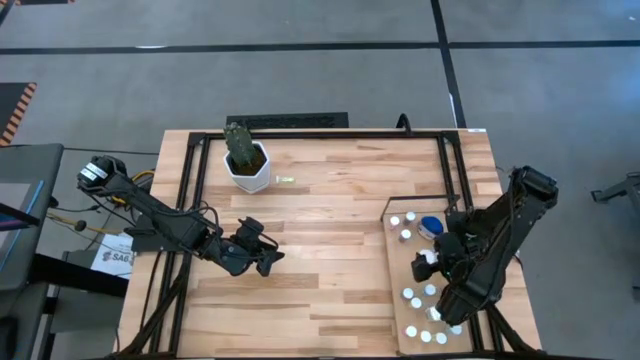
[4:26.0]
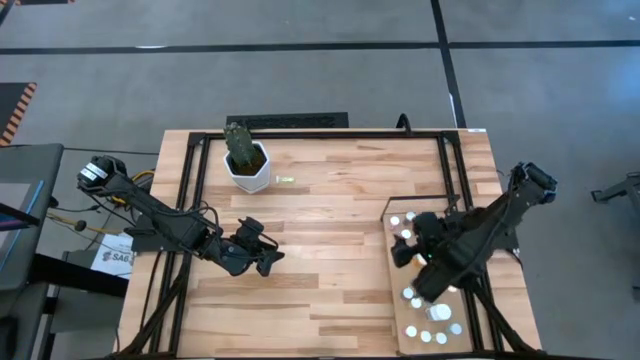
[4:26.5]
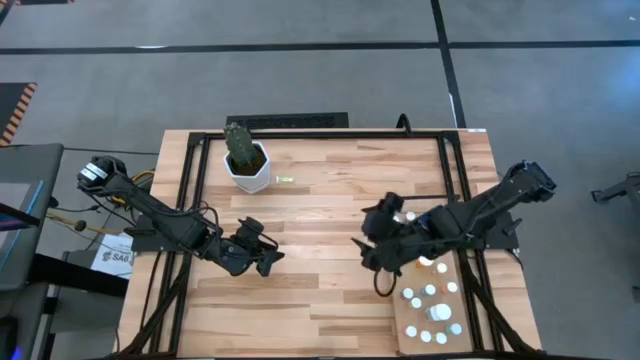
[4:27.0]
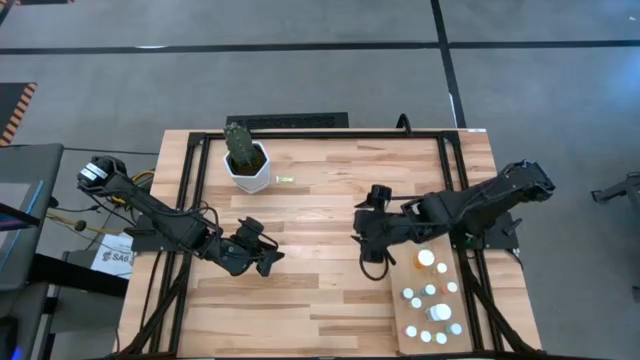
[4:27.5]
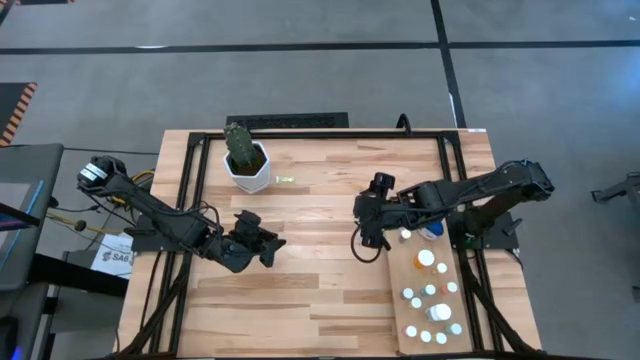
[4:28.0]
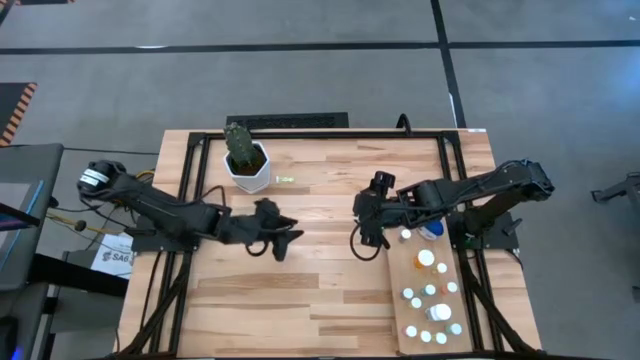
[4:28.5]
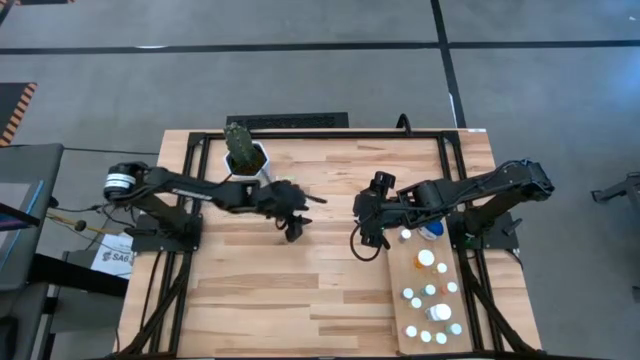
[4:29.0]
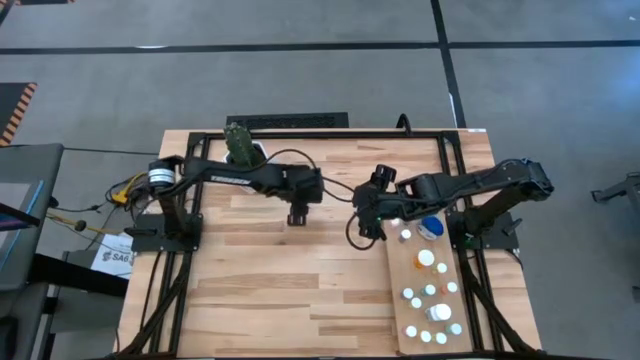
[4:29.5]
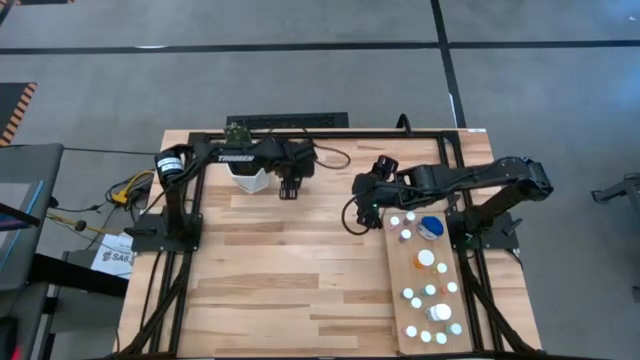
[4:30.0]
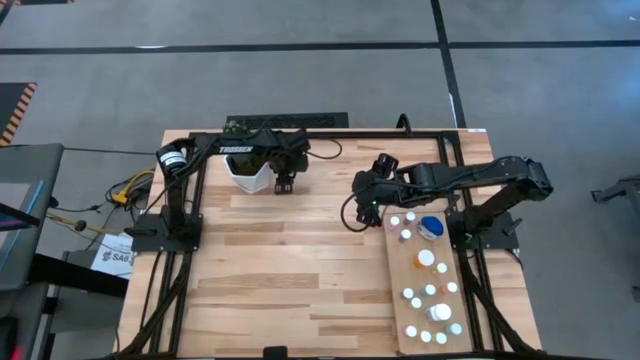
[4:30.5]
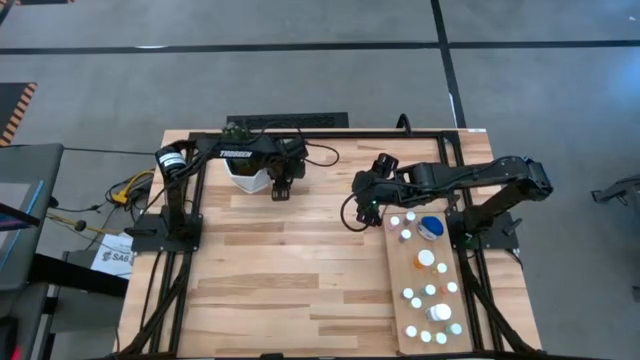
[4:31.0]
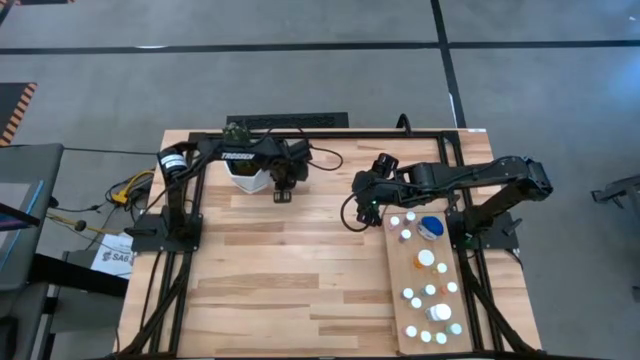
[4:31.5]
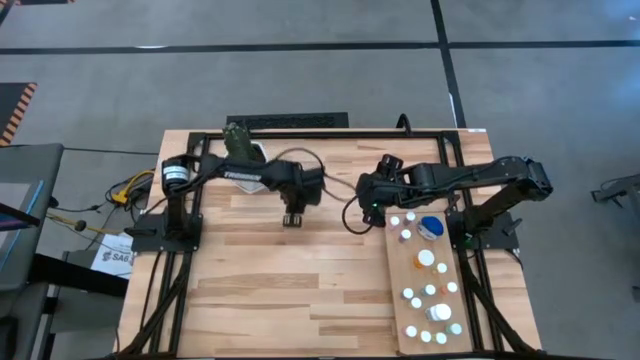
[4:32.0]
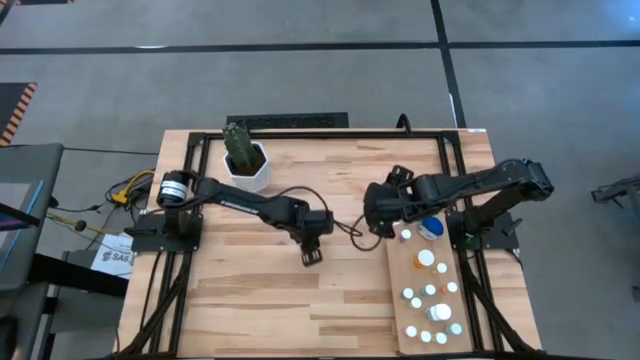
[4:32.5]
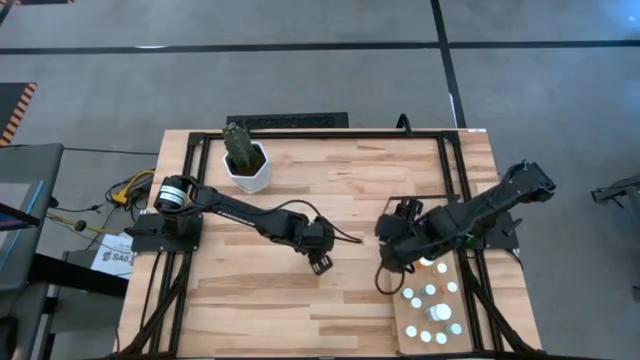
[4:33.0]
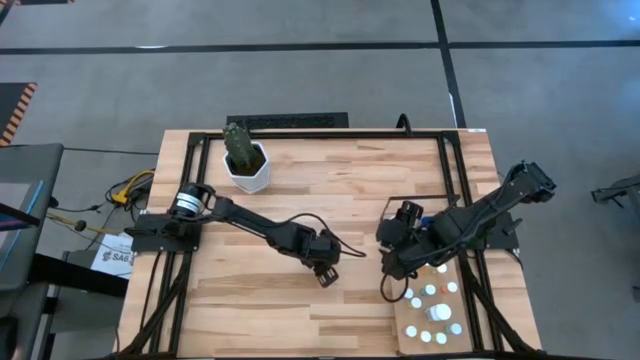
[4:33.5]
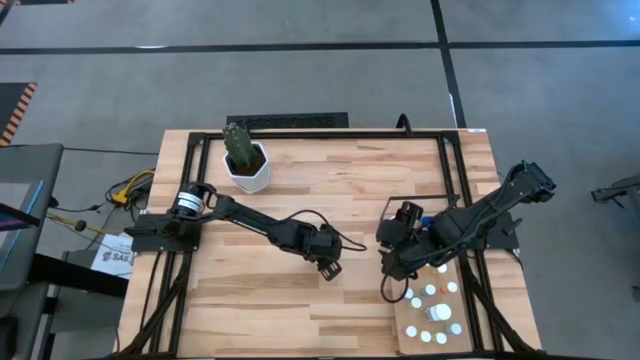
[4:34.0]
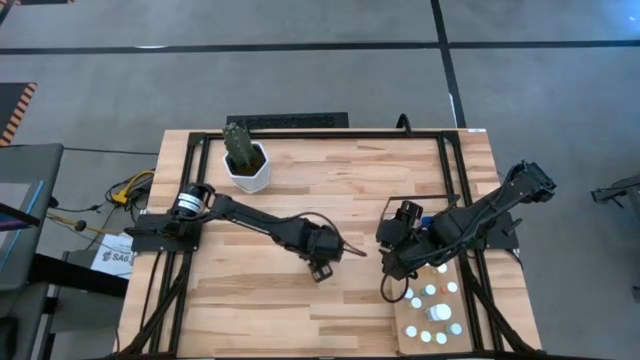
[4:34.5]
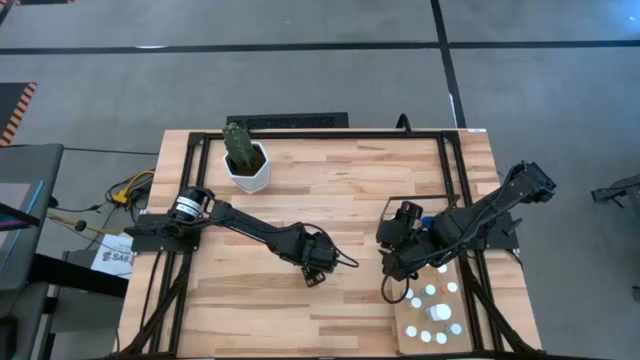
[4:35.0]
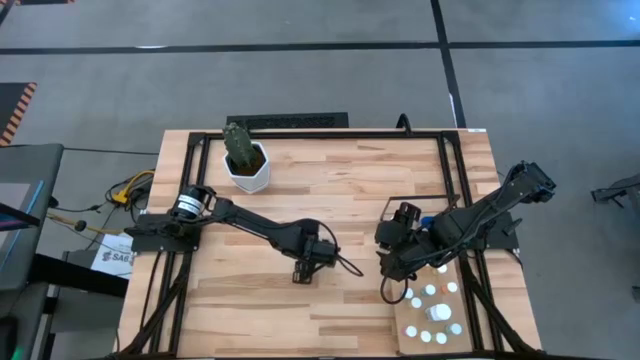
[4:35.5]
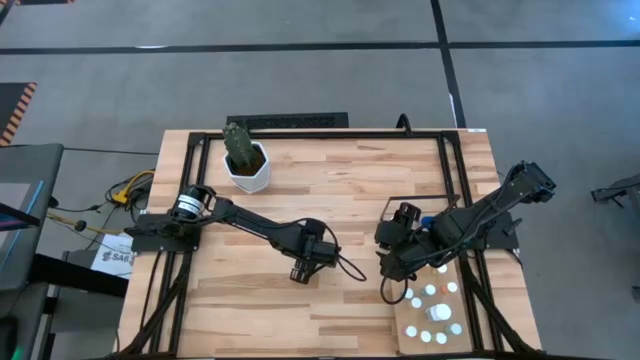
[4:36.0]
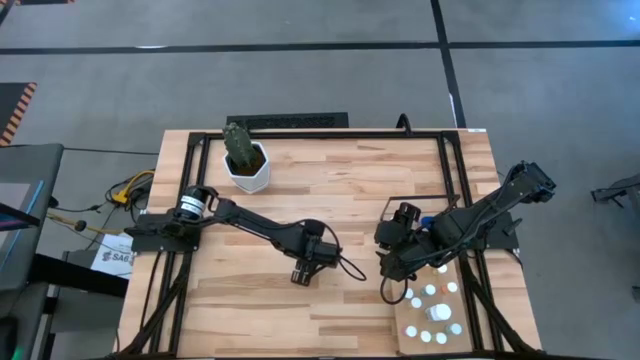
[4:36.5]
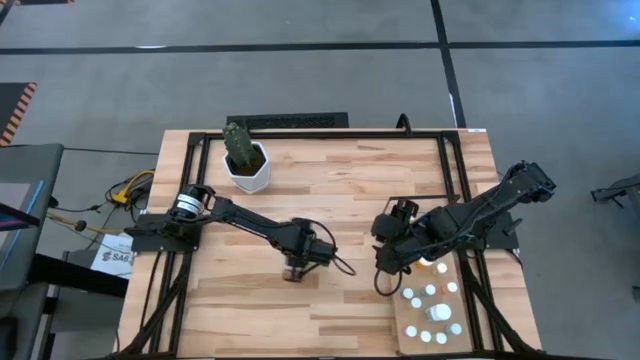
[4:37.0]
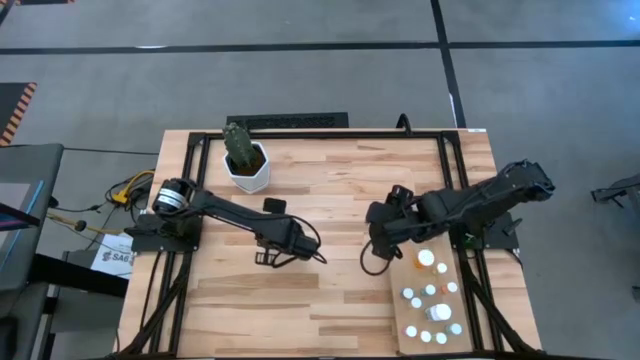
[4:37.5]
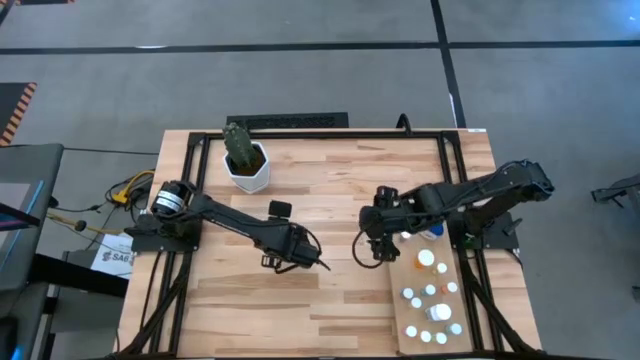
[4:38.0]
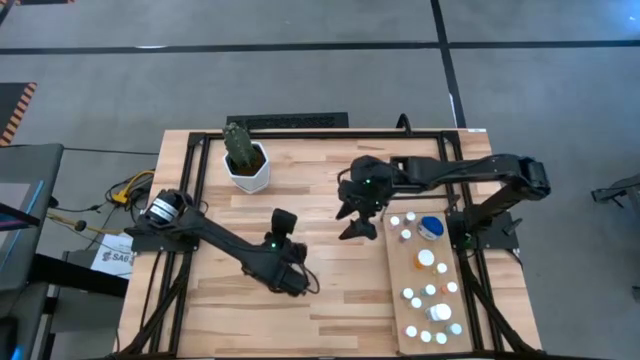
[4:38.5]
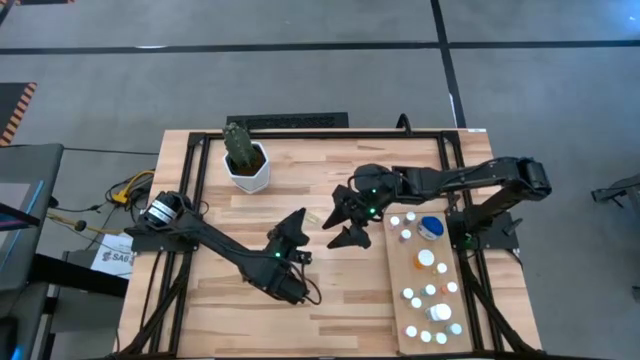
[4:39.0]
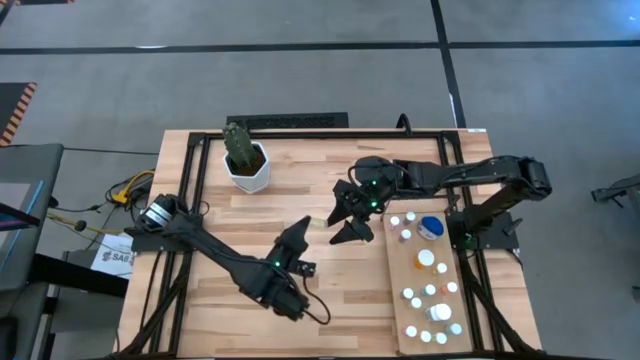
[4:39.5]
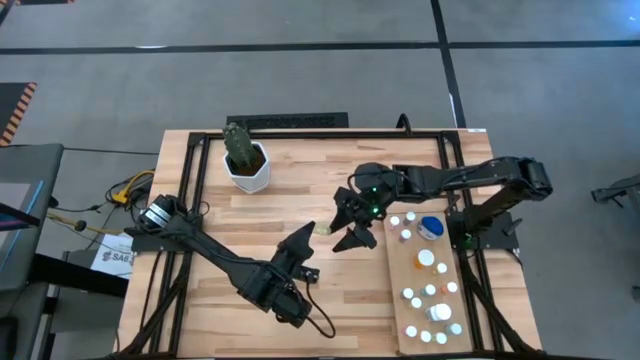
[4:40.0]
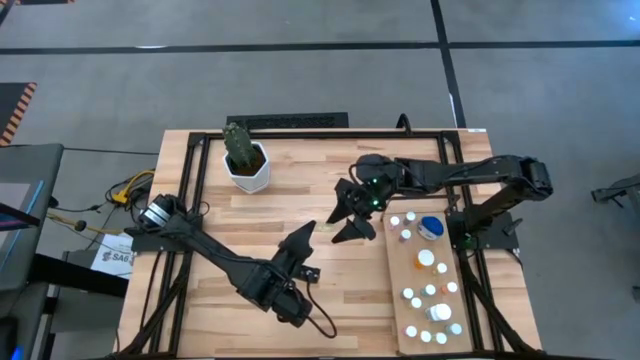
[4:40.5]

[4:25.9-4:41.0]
Task: Pick and place medicine bottles onto shelf by color
Put the yellow pill bottle on the shelf

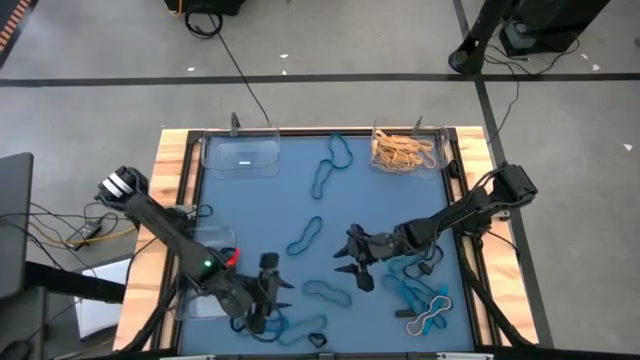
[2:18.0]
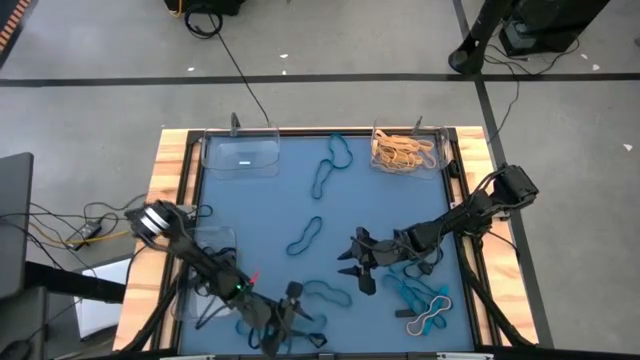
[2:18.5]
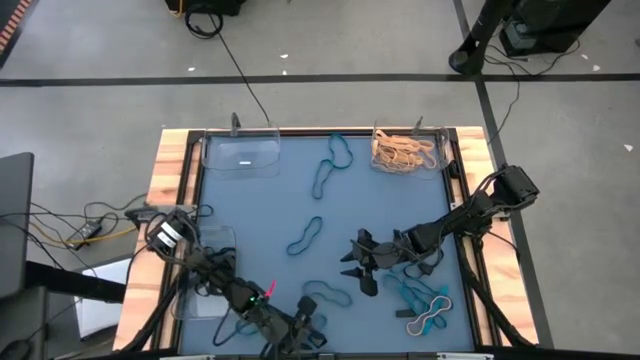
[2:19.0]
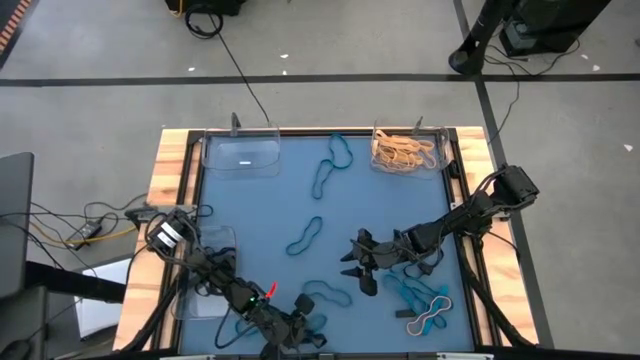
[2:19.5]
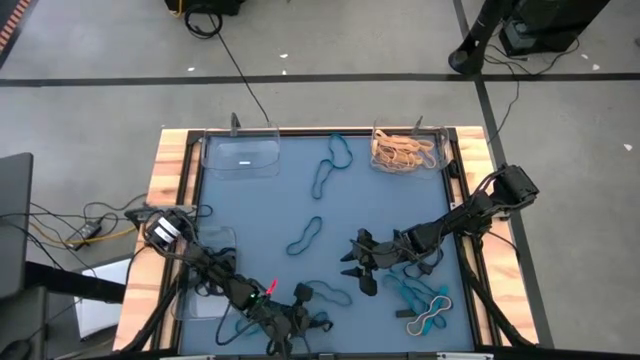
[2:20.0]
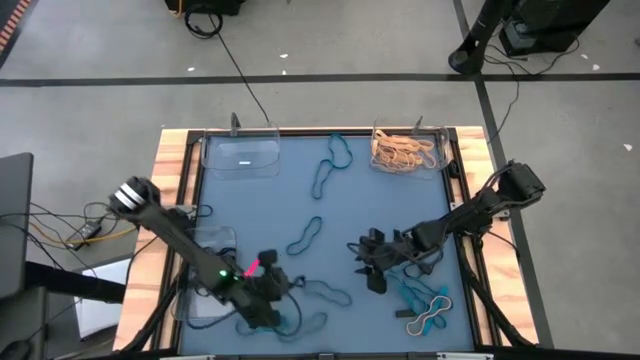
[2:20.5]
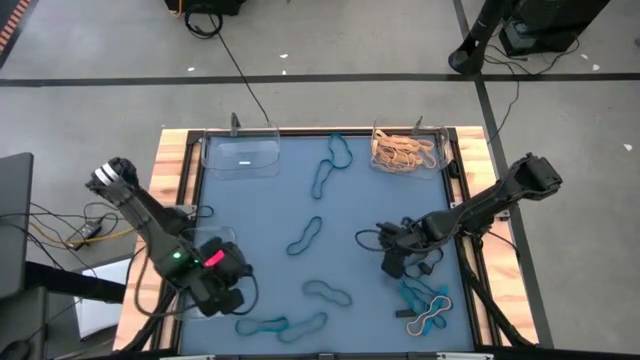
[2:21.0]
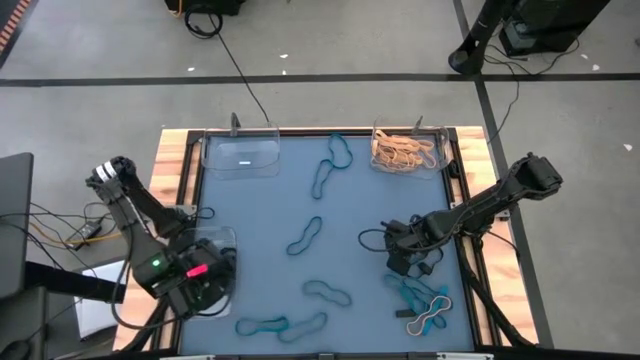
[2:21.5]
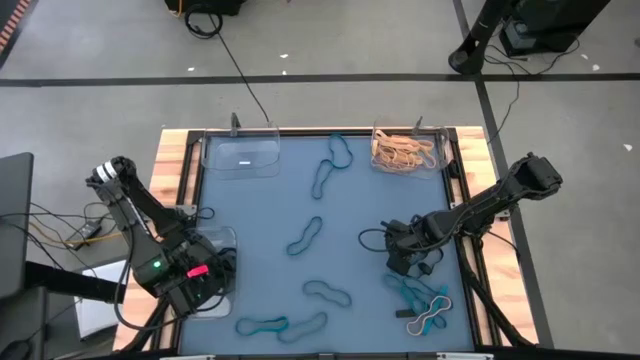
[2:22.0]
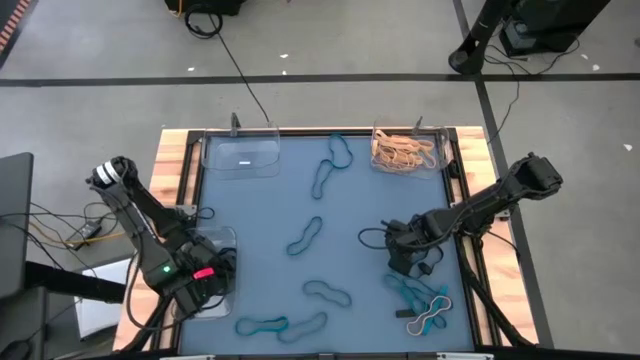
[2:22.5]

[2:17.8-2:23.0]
Task: Sort rubber bands into baskets
Put the small black rubber band into the bottom left transparent bin
